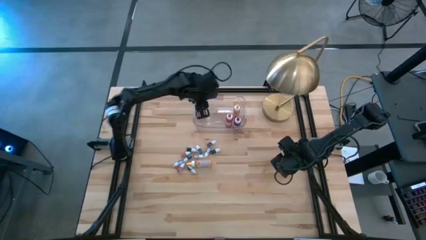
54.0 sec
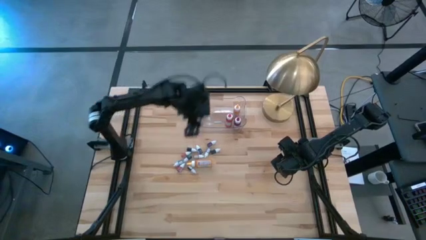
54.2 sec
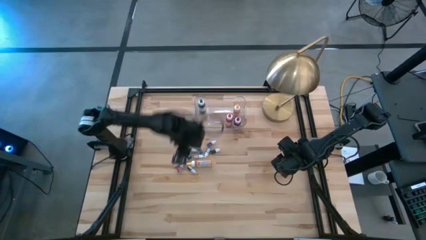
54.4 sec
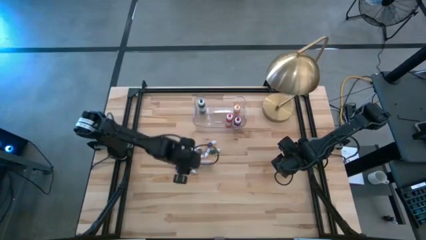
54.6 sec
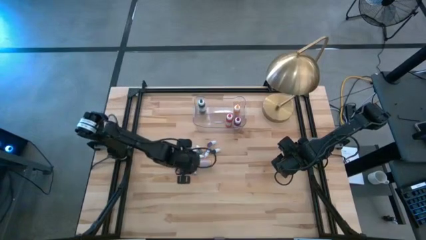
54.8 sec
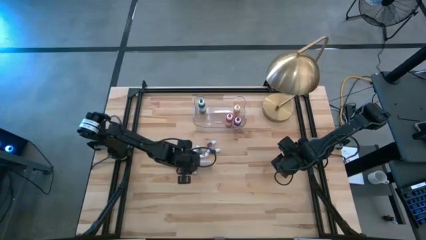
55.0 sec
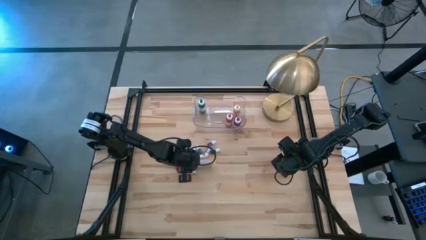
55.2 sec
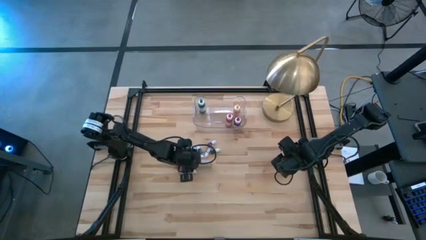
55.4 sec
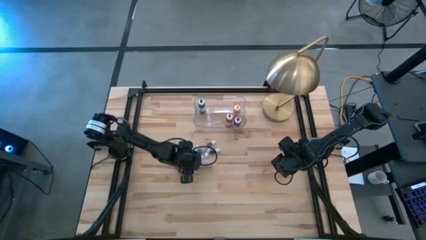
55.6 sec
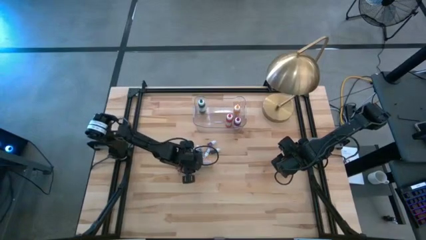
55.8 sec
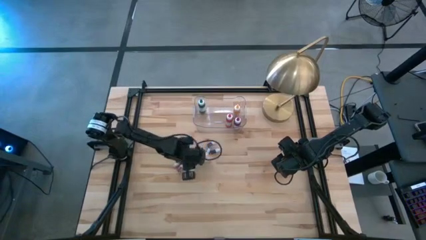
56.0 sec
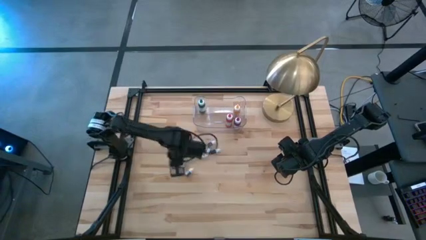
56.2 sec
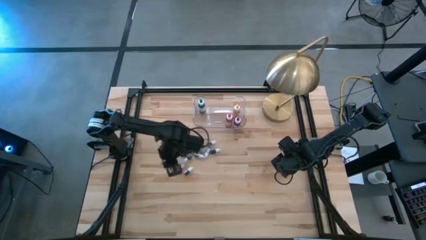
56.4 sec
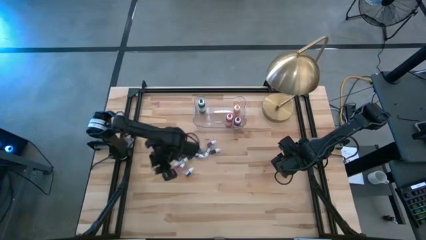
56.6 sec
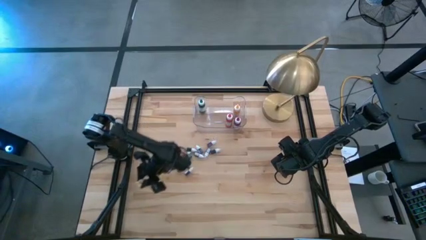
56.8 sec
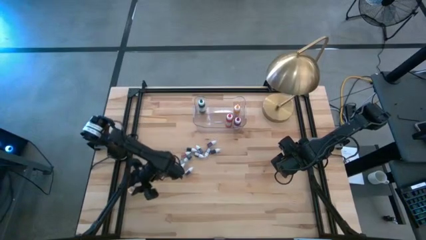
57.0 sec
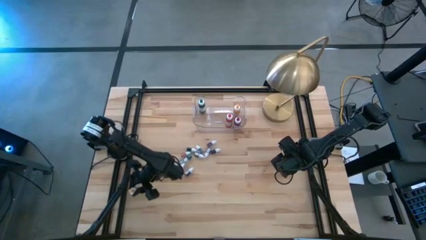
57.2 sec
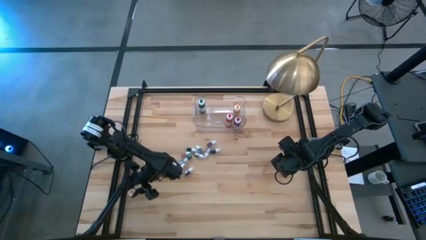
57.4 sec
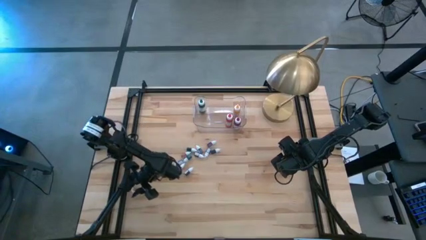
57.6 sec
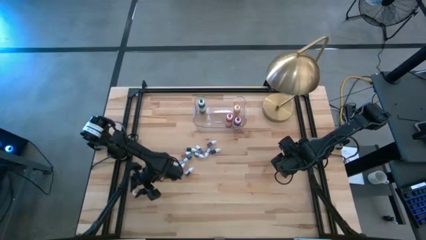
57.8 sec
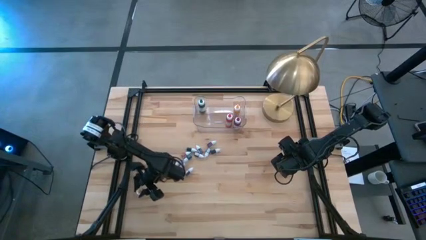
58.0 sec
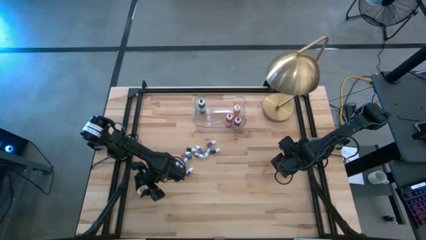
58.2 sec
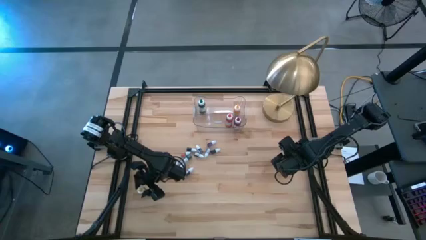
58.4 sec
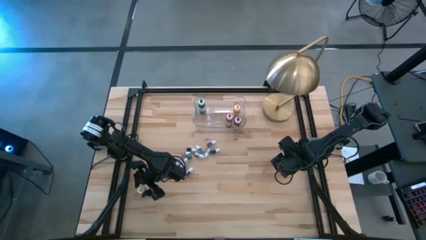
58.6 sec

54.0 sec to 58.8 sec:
Task: Pick & Place food coloring
Move the big yellow food coloring bottle to the bottom left of the table

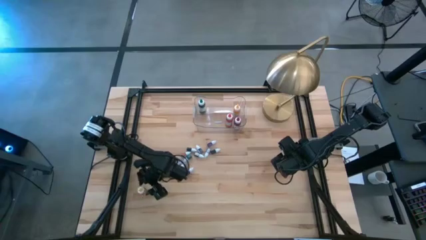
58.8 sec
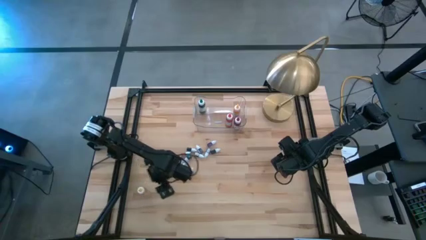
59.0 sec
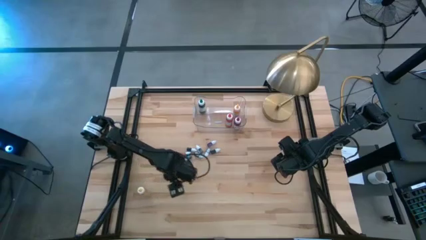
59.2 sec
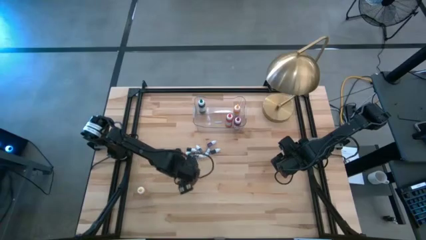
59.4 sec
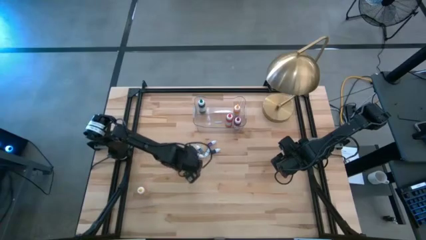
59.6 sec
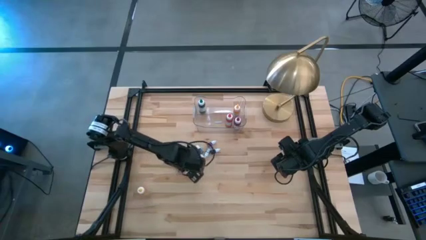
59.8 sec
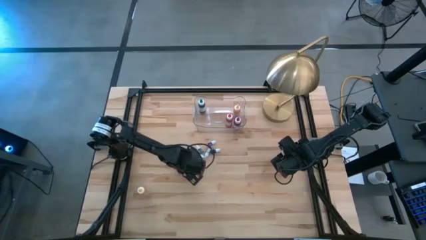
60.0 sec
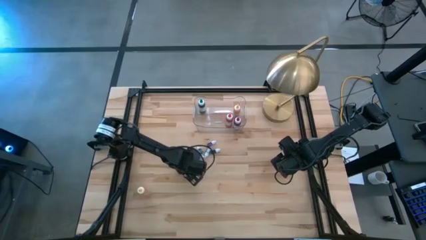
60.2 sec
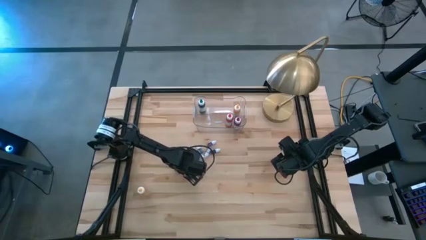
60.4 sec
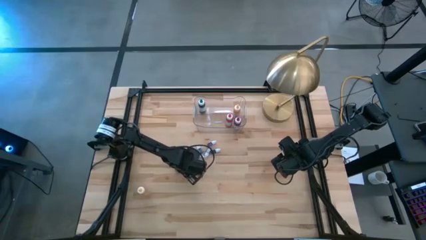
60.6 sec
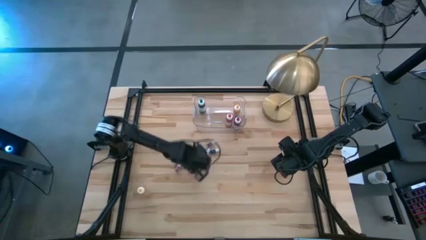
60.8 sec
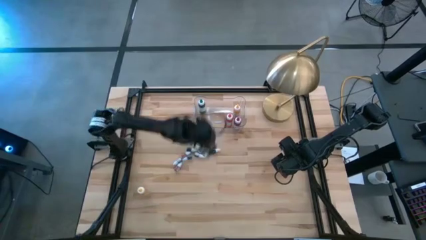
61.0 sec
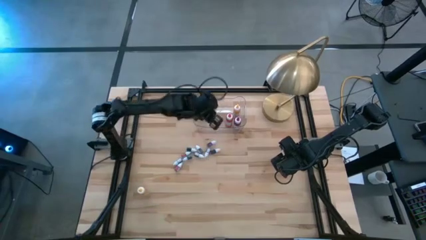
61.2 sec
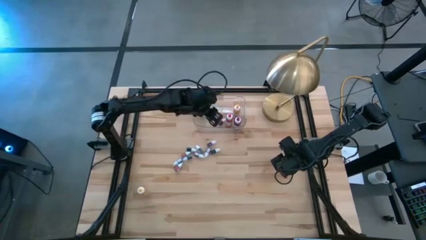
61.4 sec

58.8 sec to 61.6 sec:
Put the small black food coloring bottle into the transparent bin

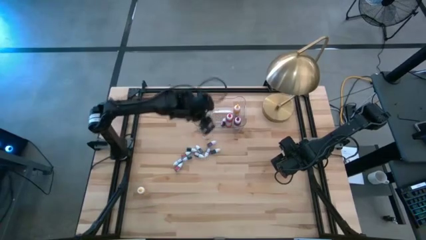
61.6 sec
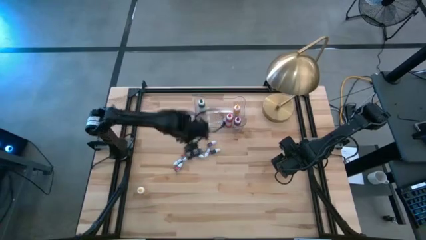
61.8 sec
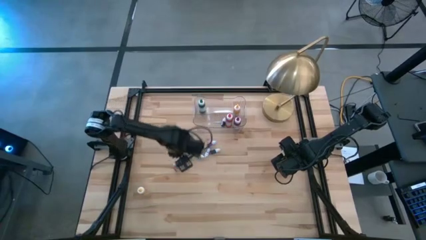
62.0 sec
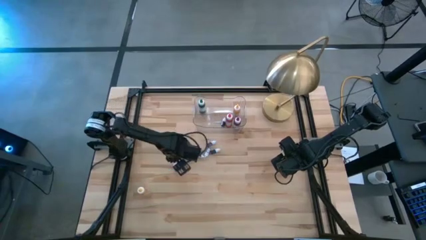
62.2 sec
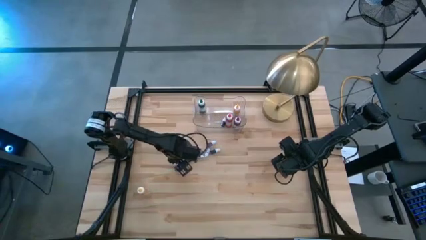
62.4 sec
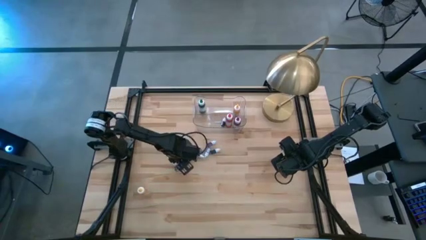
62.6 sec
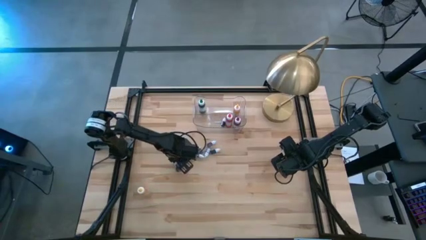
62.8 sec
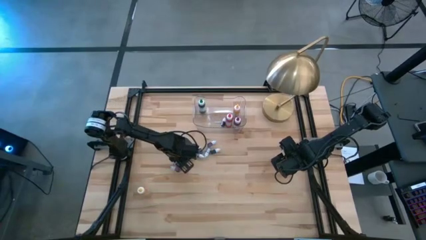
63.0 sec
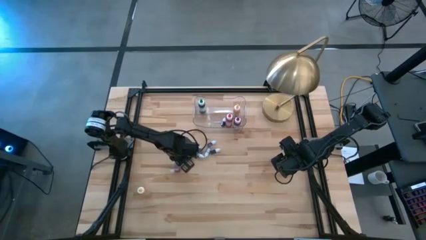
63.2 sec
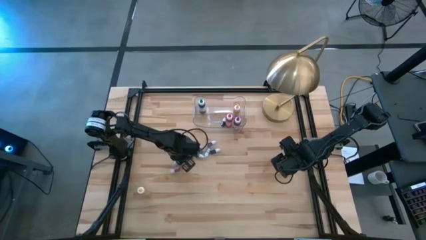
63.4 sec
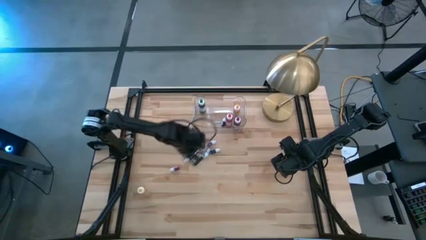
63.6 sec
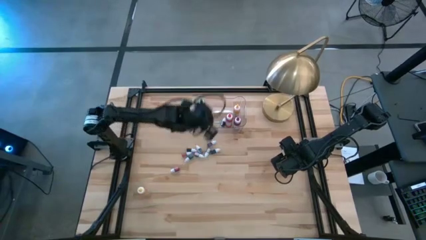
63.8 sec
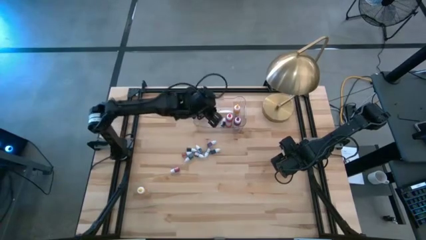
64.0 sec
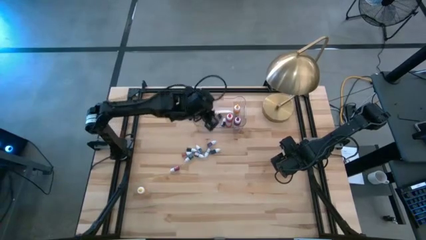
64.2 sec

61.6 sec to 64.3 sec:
Put the small blue food coloring bottle into the transparent bin

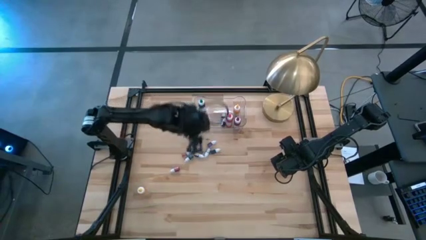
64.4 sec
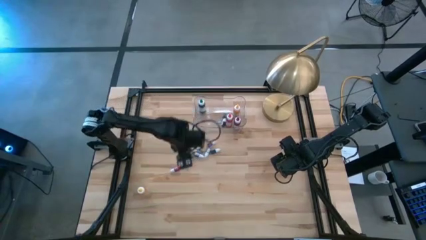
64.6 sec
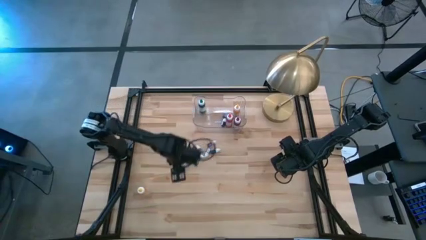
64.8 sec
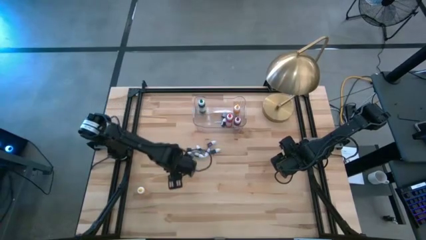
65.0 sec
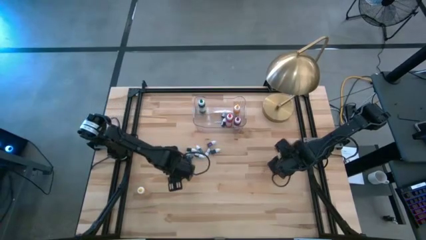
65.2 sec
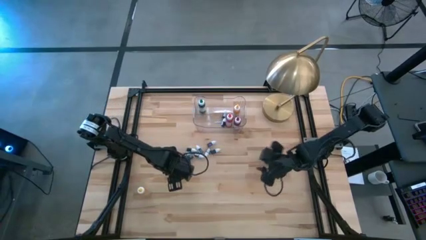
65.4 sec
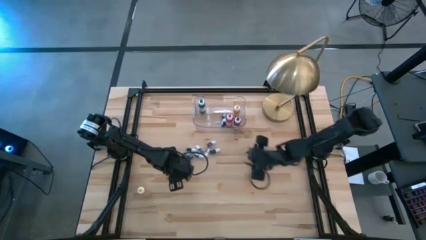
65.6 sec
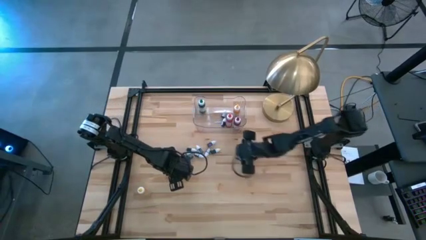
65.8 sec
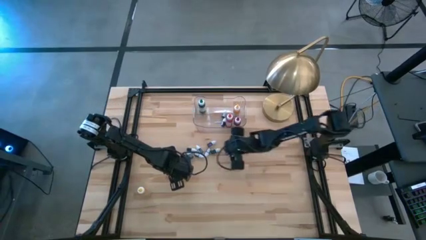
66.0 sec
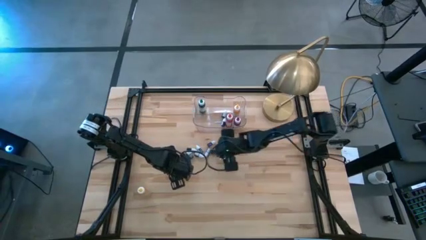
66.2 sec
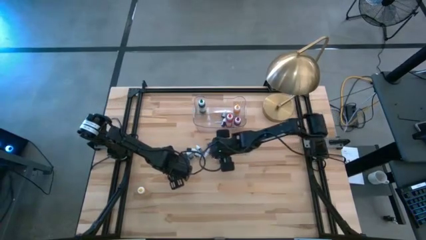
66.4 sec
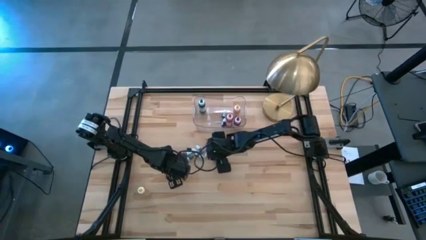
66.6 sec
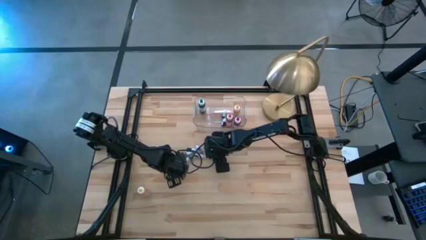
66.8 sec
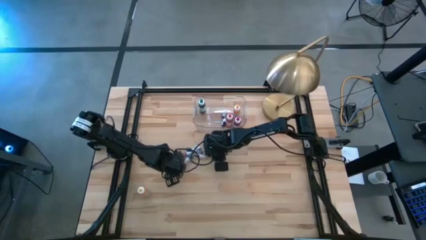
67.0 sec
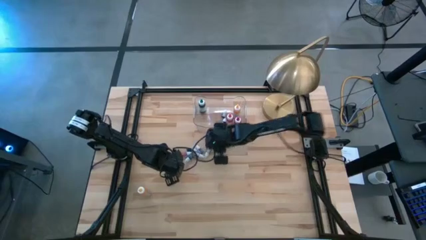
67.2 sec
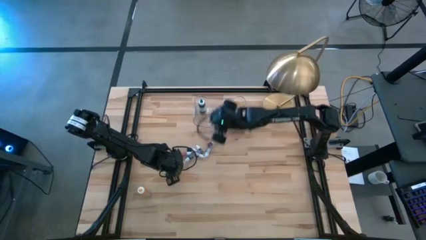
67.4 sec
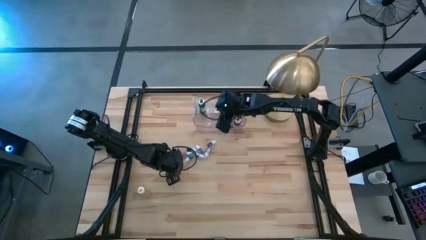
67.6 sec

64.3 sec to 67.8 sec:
Put the small black food coloring bottle into the transparent bin

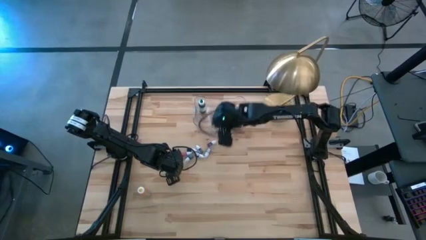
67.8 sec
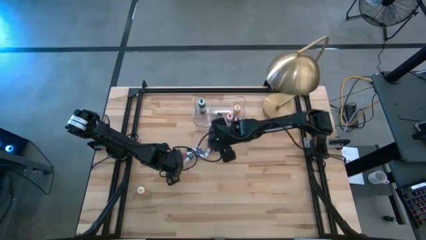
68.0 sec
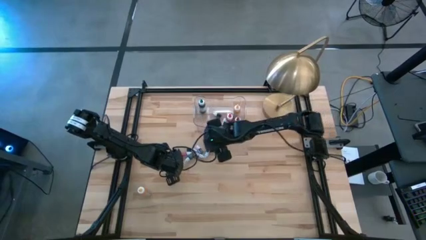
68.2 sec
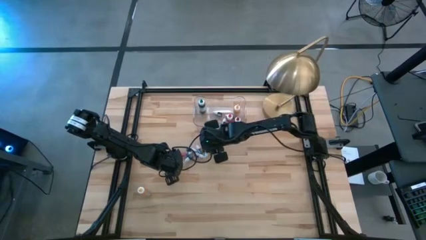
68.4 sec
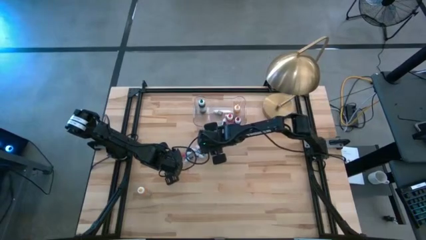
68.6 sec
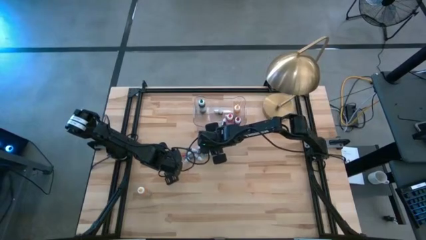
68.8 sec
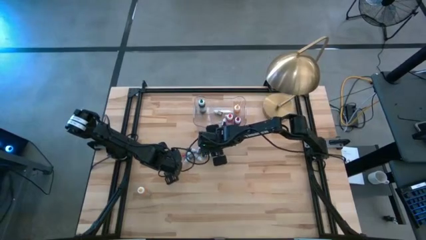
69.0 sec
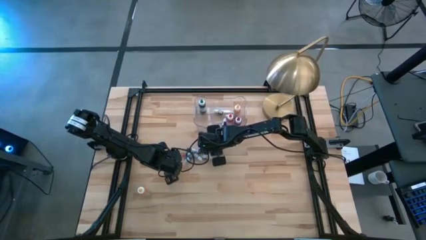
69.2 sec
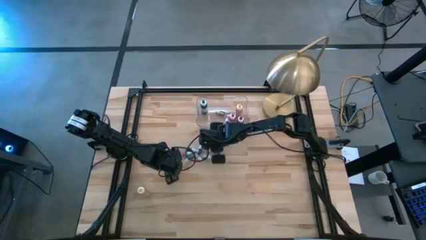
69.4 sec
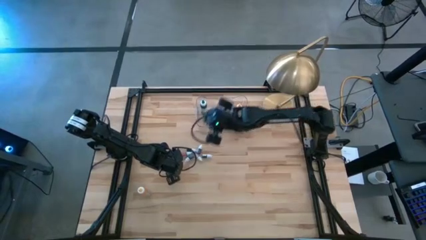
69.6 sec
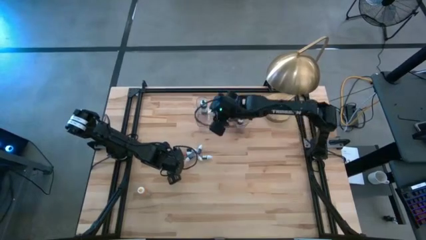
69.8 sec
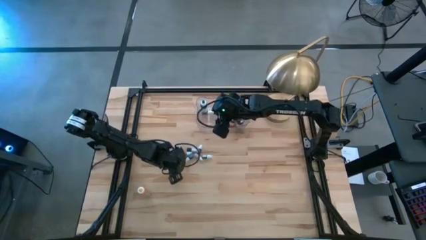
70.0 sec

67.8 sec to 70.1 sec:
Put the small violet food coloring bottle into the transparent bin

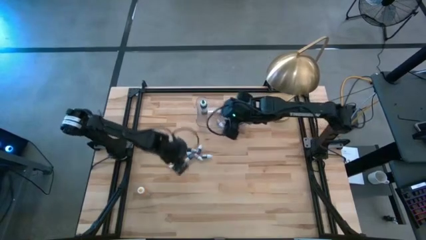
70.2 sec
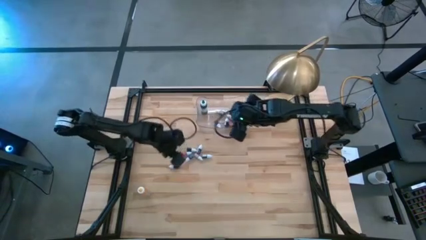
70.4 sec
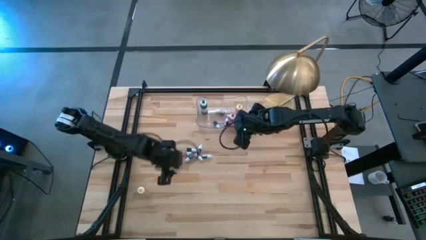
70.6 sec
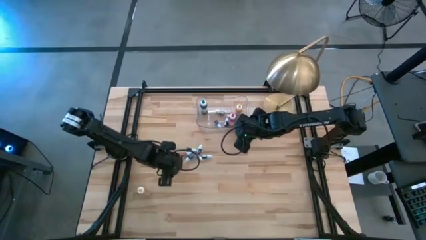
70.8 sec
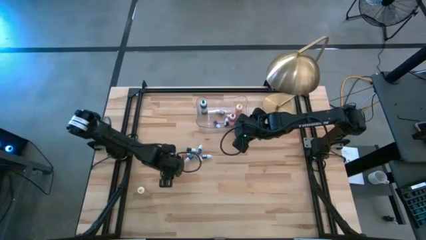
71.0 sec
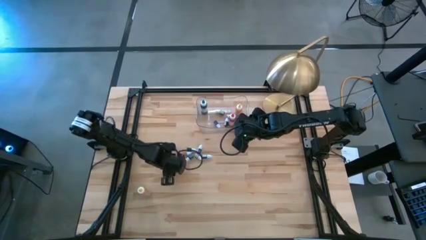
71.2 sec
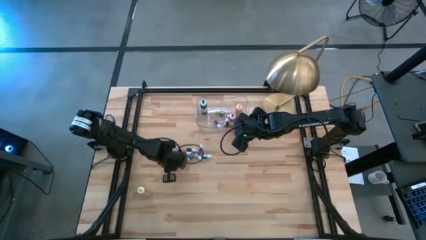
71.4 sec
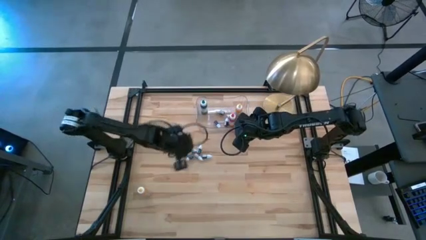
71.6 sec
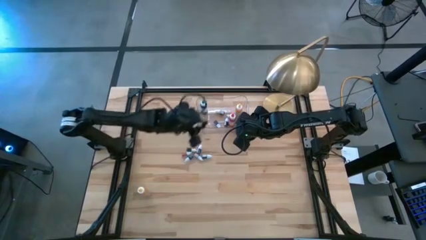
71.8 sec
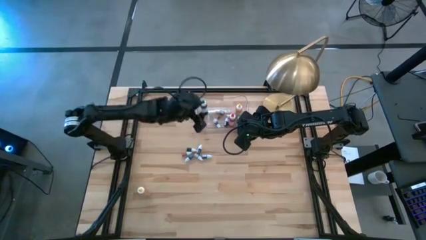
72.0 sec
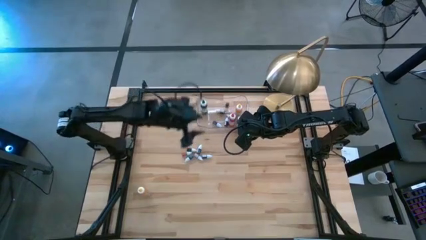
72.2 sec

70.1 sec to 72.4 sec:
Put the small pink food coloring bottle into the transparent bin
